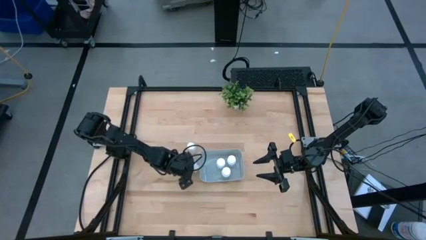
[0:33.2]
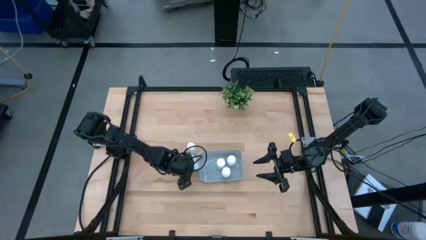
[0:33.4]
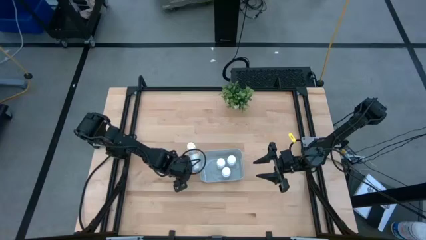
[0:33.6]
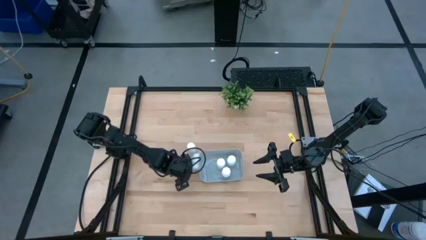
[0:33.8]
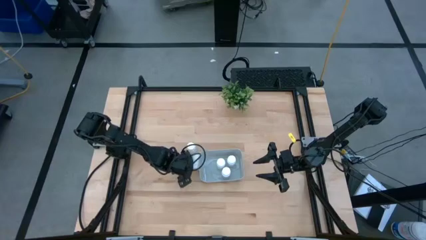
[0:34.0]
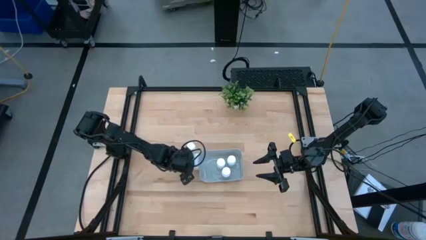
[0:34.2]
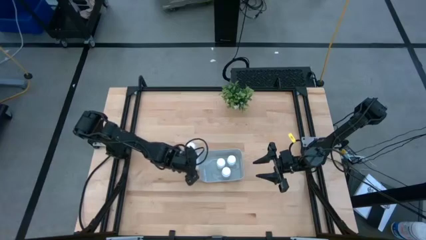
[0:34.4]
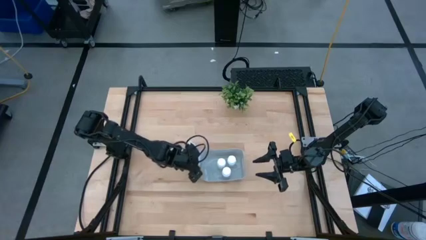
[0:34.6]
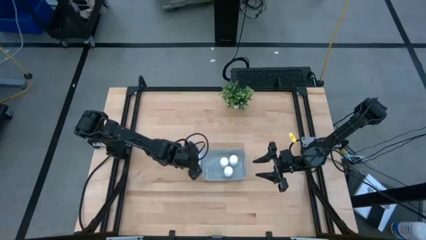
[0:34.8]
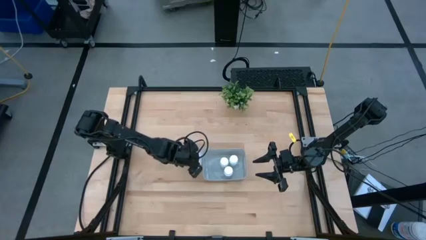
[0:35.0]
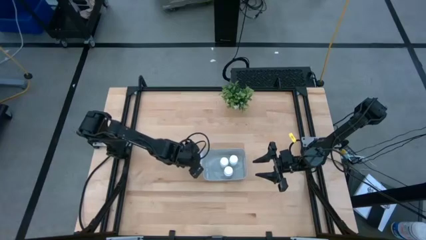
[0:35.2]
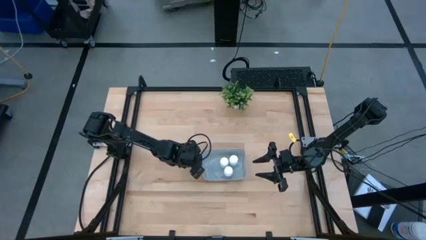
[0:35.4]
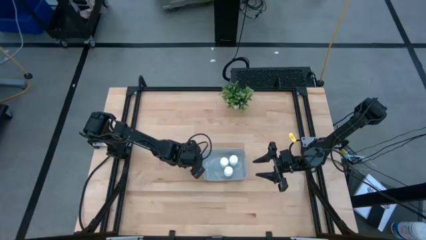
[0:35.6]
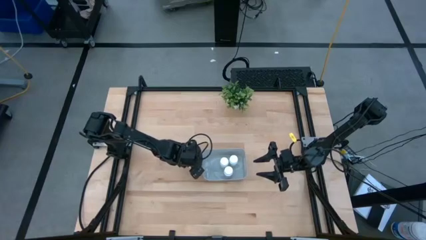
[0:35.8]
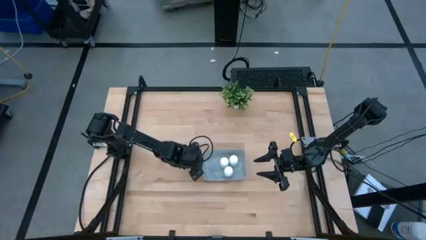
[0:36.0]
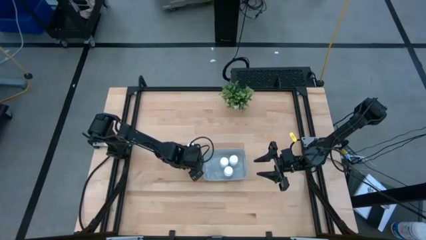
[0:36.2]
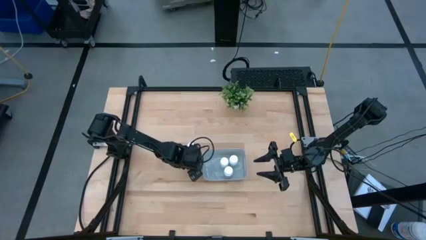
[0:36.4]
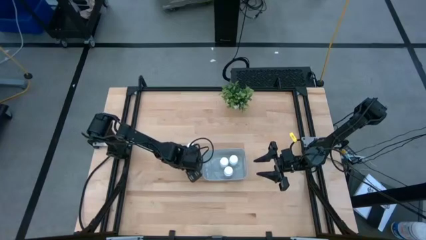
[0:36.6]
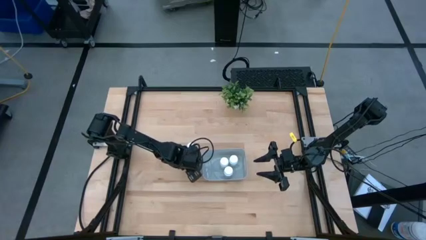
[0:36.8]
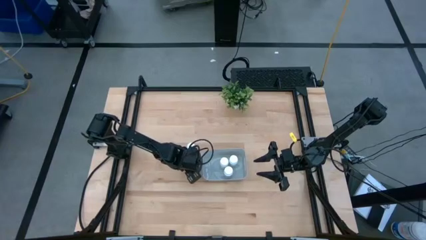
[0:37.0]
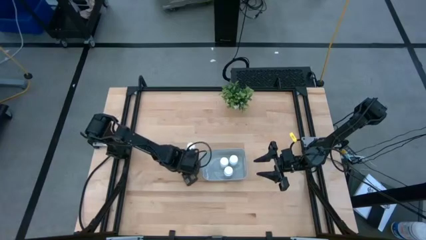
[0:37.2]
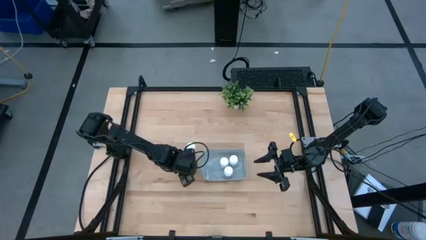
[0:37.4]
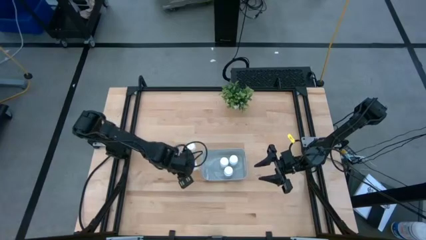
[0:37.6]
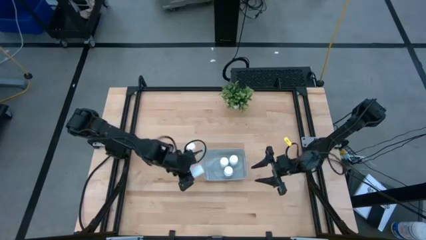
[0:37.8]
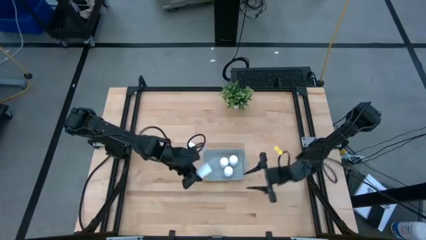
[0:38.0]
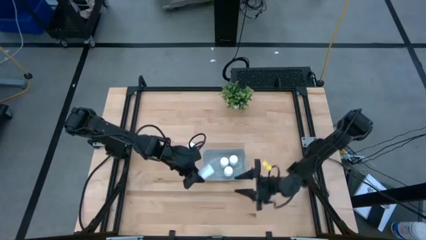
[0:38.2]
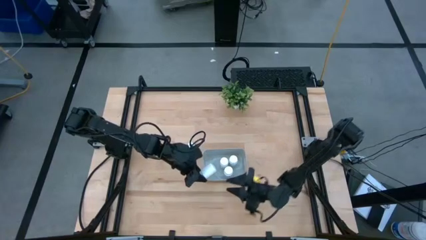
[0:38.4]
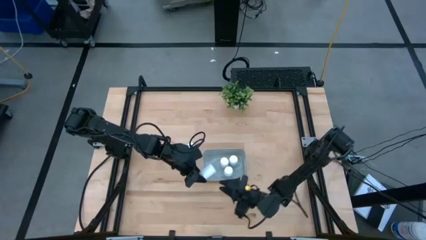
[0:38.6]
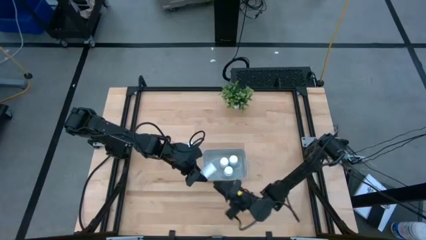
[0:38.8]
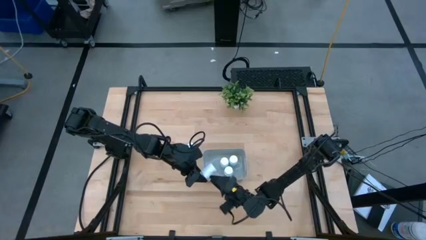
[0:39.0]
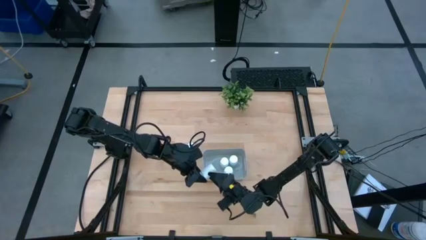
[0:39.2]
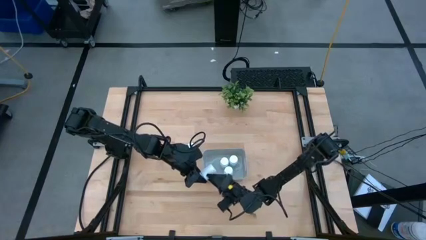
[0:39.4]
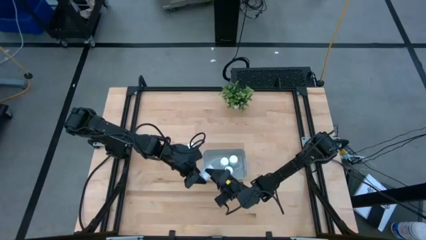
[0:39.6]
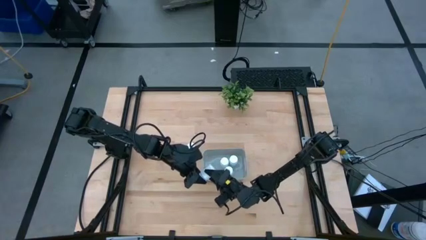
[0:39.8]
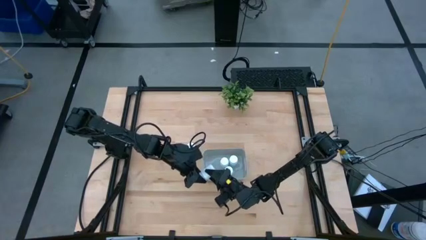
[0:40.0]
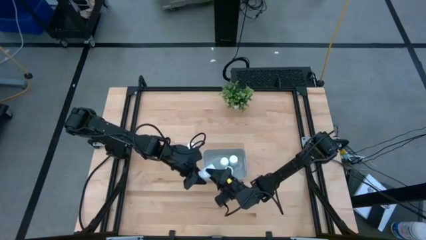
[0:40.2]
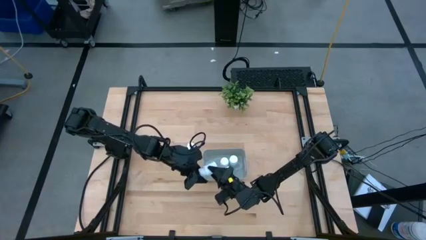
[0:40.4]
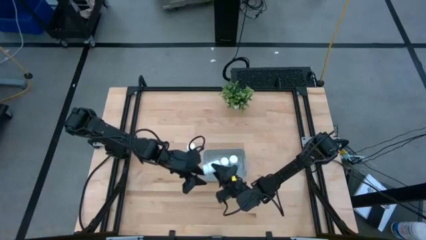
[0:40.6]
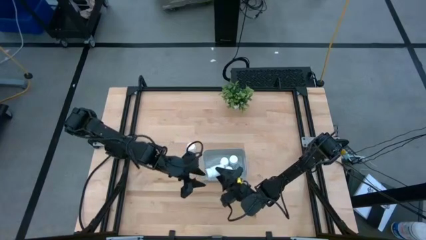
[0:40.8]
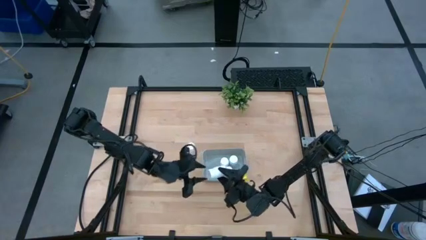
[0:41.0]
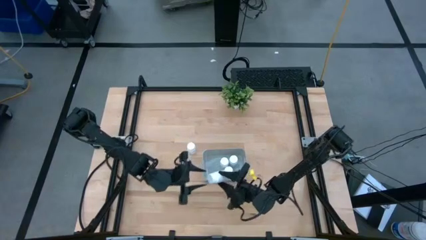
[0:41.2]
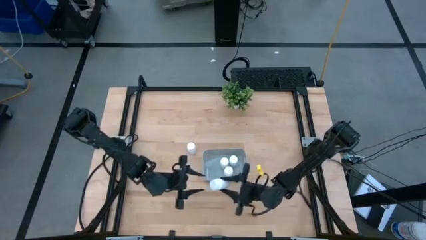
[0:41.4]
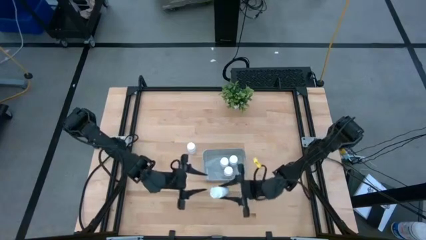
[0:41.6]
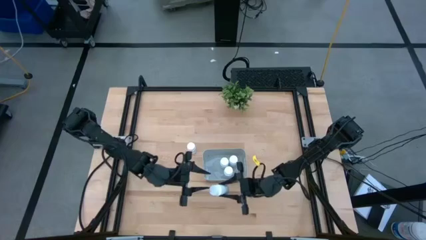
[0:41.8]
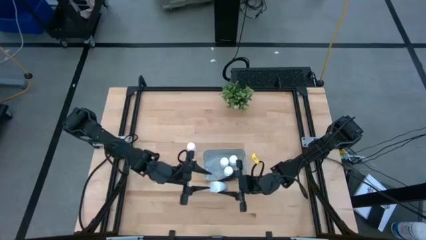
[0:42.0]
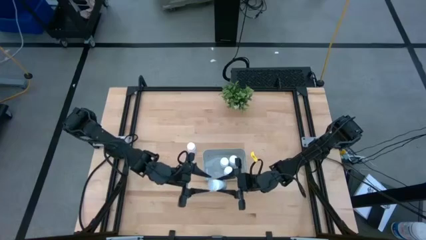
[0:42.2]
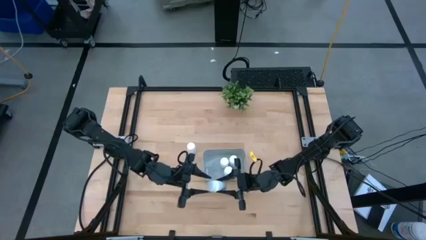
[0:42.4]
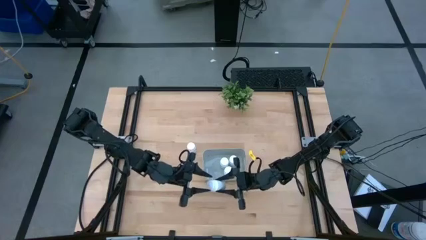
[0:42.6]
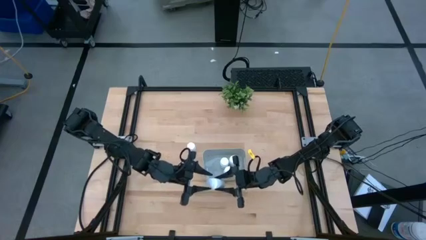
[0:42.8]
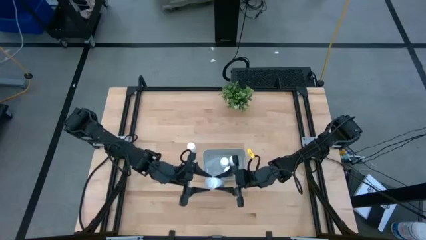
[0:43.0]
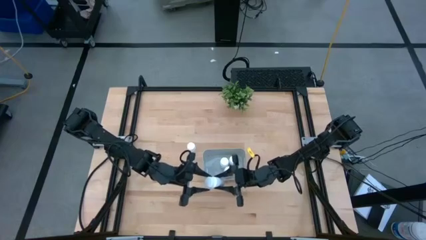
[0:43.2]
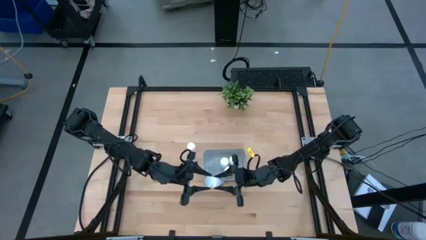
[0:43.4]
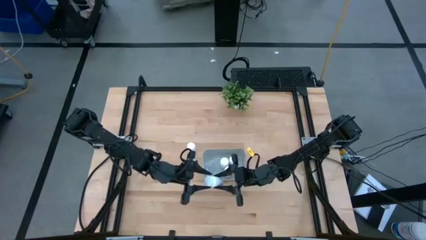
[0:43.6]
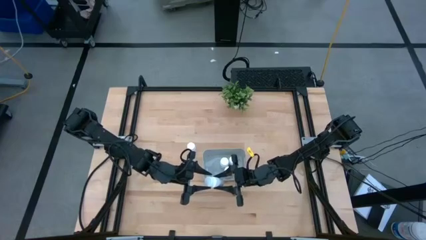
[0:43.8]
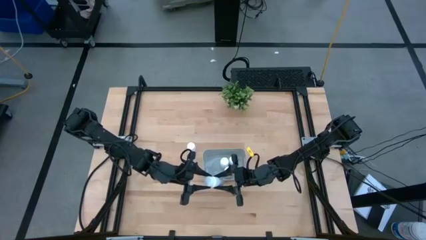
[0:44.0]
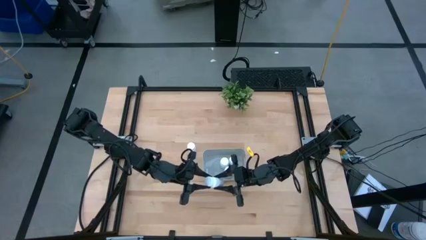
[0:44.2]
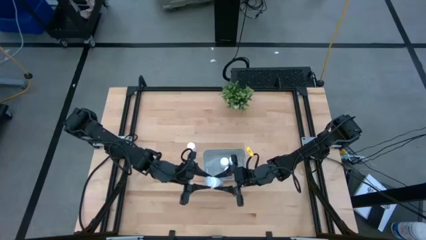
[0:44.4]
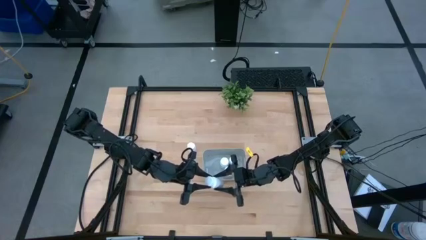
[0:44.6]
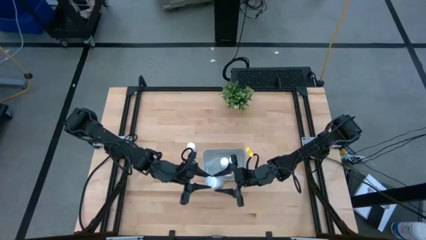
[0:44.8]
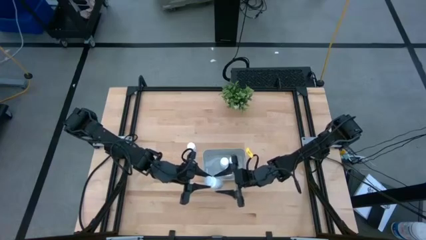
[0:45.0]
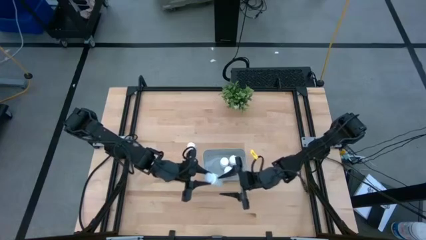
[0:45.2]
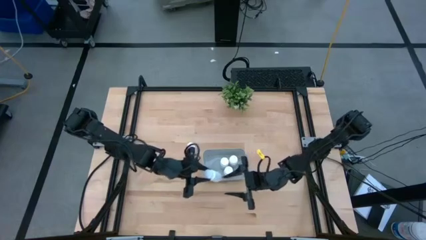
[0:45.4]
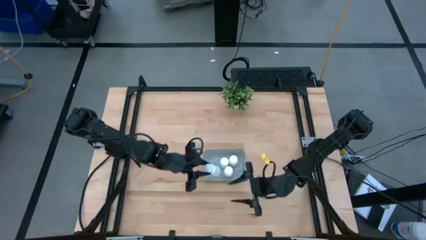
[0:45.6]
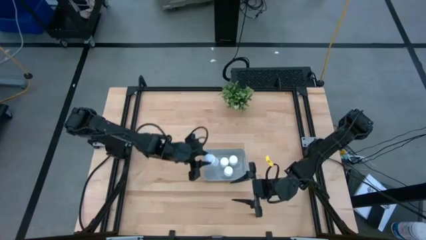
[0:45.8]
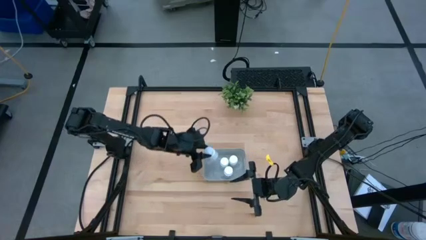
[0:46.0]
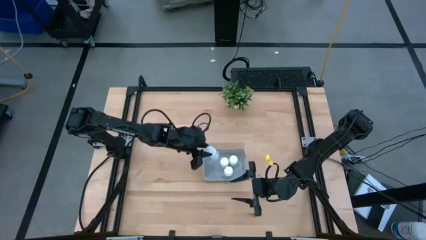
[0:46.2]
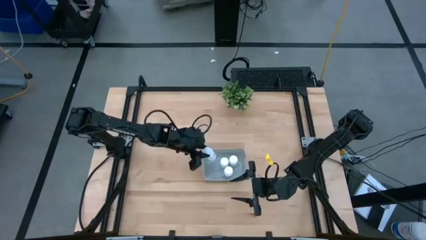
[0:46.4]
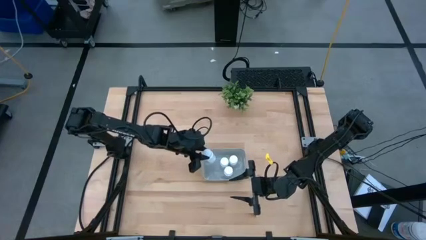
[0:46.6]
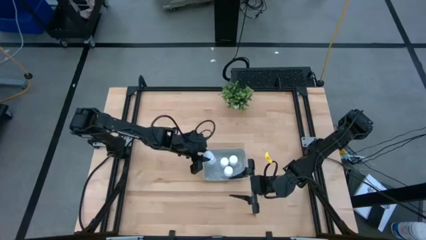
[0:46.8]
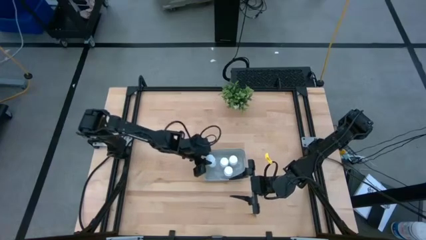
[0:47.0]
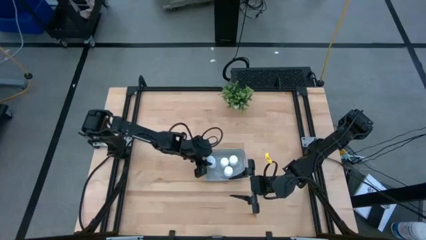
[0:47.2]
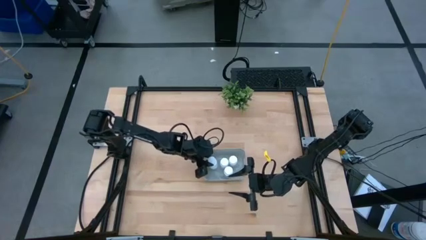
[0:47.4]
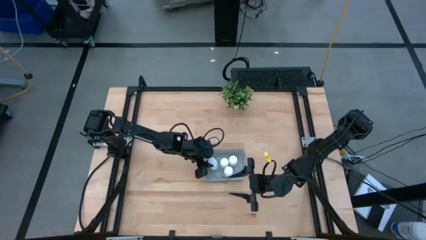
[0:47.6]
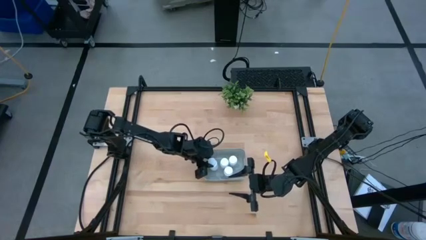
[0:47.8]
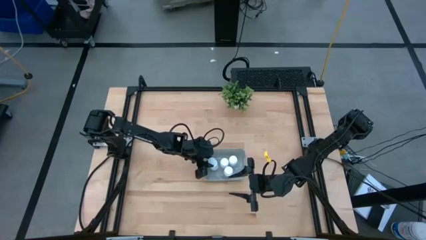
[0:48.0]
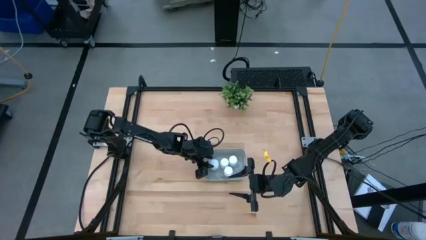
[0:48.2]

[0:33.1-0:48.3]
Task: Pick and place pill bottles into a basket
Put the white pill bottle into the white bin

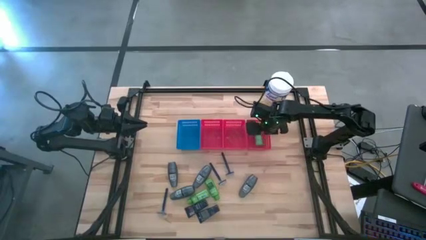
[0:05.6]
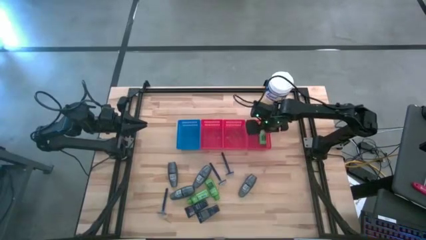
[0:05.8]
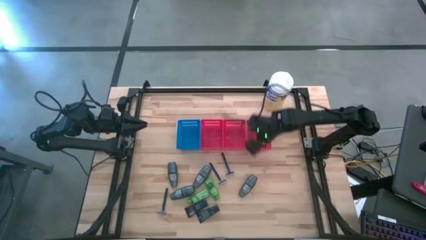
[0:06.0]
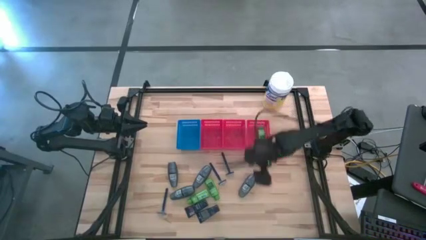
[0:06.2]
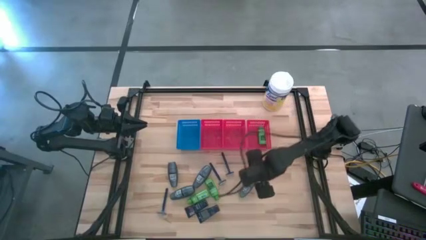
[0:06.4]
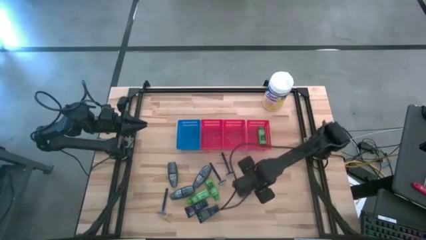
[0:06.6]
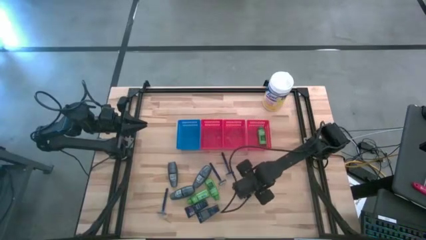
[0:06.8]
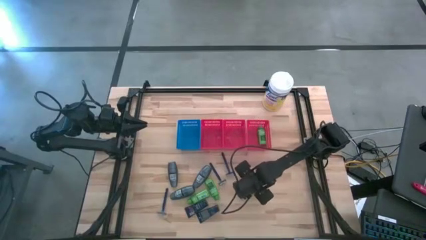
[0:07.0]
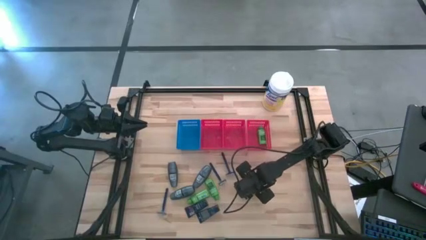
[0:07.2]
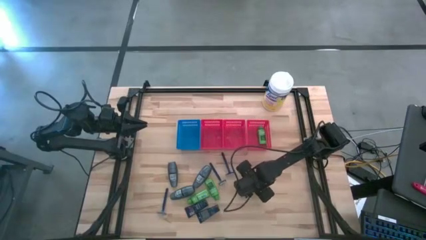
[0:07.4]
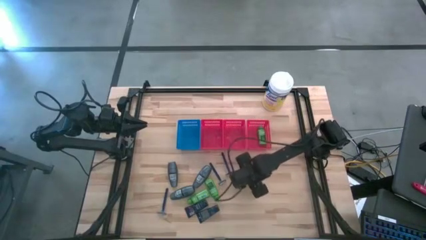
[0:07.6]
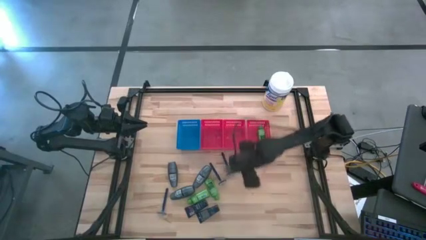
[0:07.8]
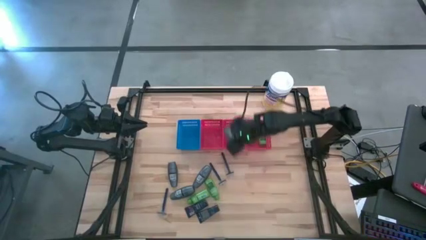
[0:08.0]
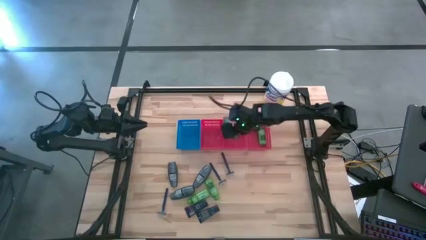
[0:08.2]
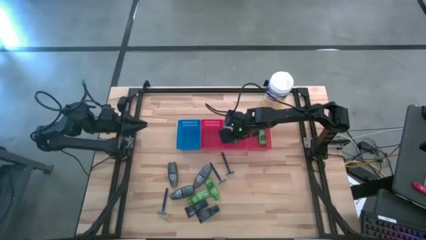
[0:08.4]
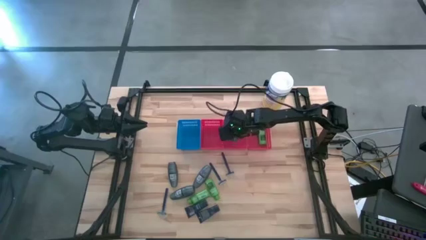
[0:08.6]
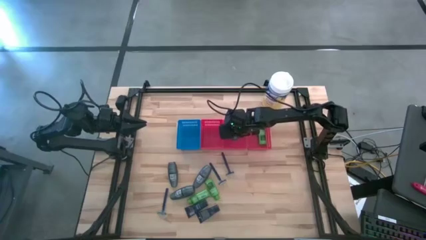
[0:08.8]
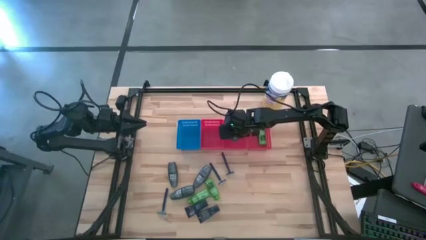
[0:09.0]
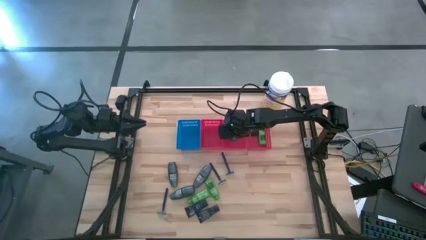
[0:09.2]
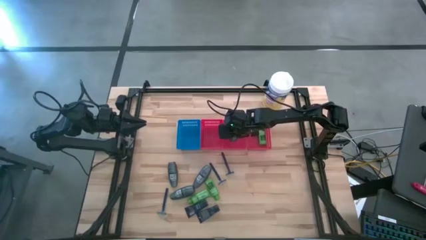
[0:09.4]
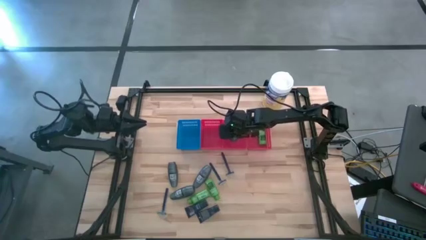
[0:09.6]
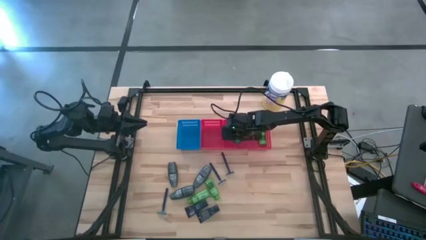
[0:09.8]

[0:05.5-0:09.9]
Task: Pick & Place Travel size toiletries
Put the gray deodorant into the middle red bin
